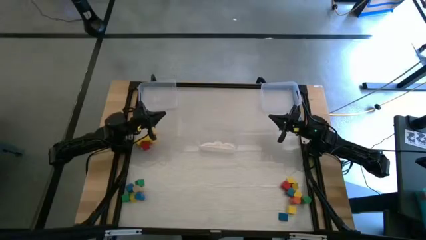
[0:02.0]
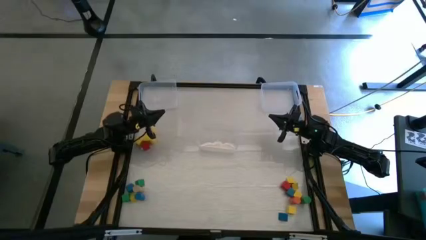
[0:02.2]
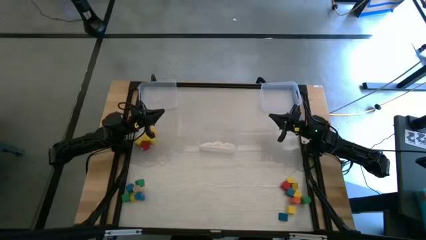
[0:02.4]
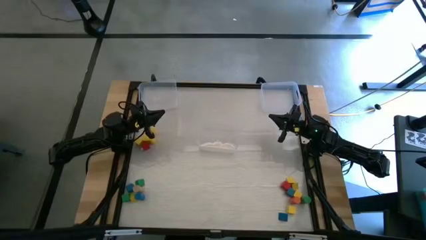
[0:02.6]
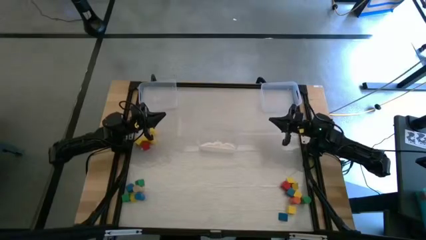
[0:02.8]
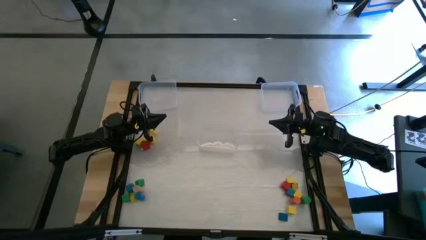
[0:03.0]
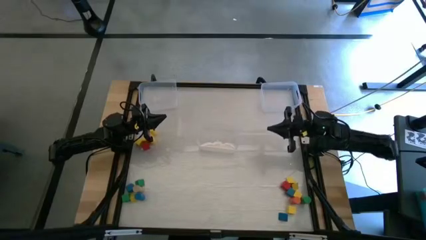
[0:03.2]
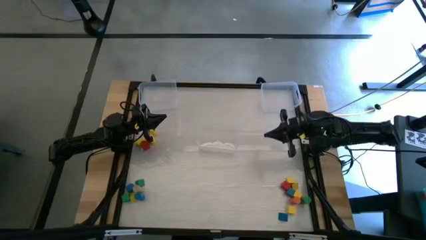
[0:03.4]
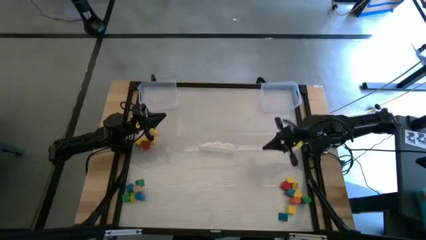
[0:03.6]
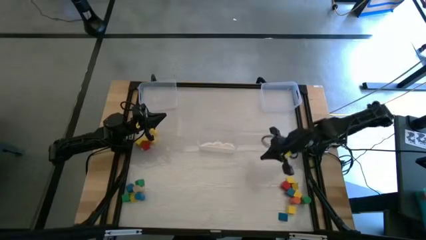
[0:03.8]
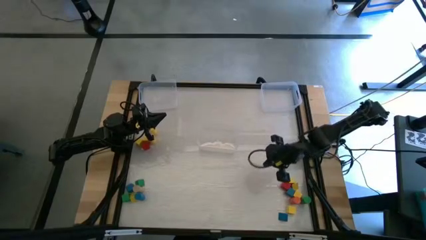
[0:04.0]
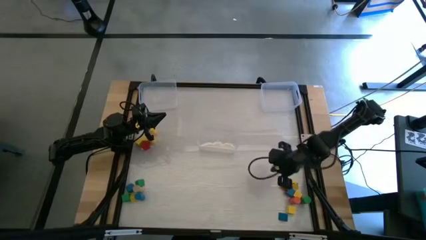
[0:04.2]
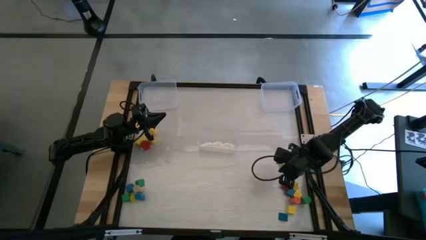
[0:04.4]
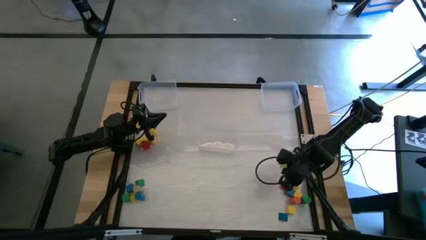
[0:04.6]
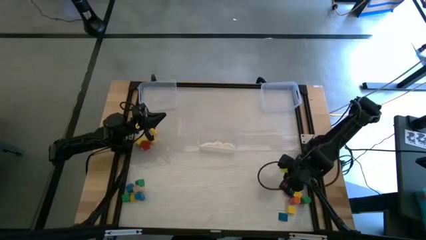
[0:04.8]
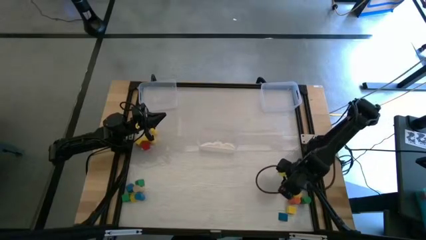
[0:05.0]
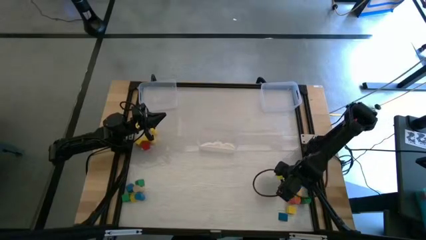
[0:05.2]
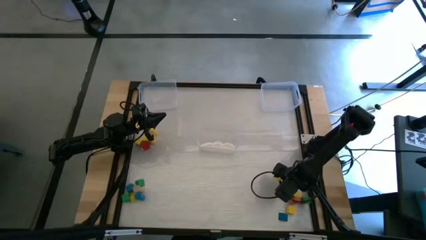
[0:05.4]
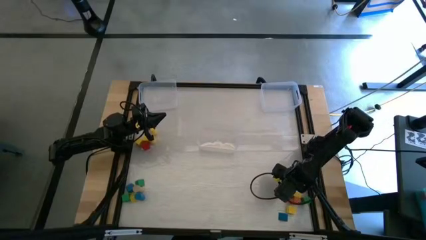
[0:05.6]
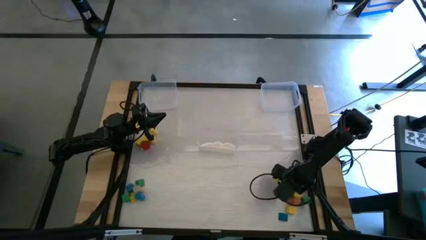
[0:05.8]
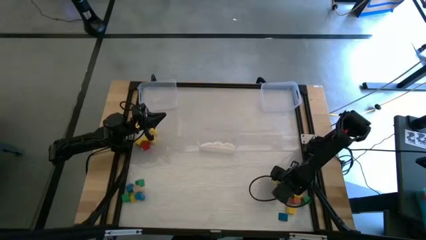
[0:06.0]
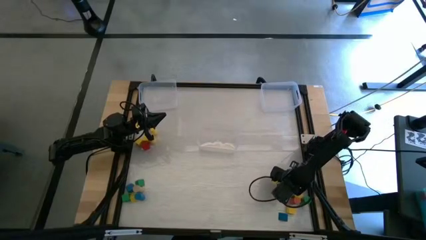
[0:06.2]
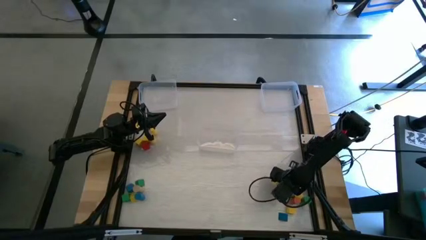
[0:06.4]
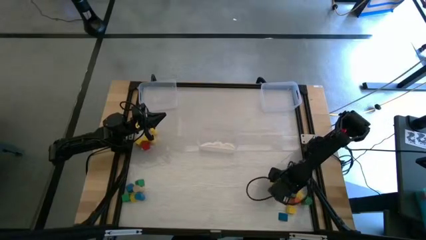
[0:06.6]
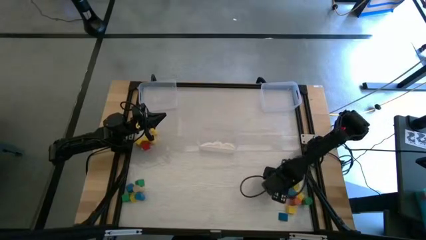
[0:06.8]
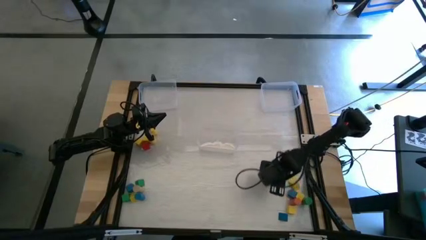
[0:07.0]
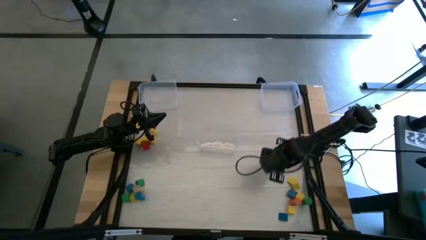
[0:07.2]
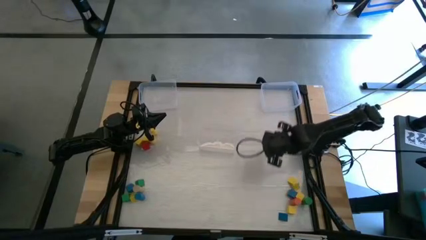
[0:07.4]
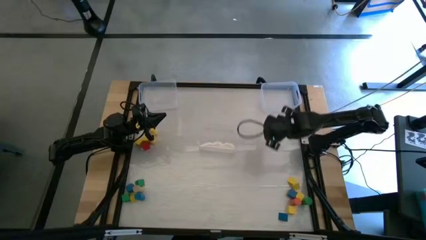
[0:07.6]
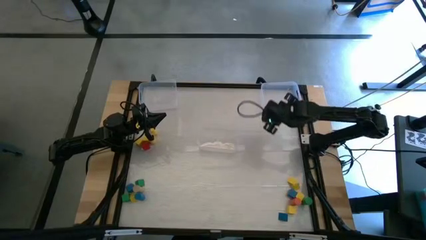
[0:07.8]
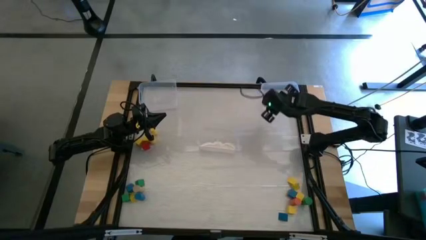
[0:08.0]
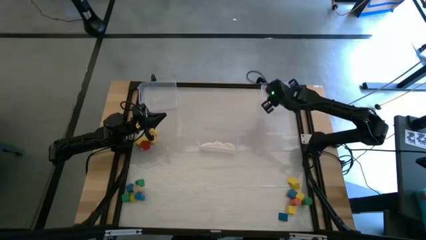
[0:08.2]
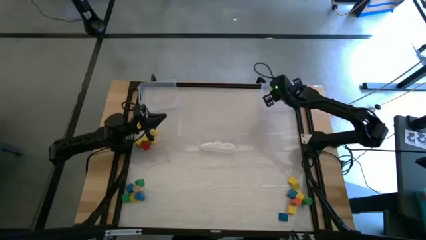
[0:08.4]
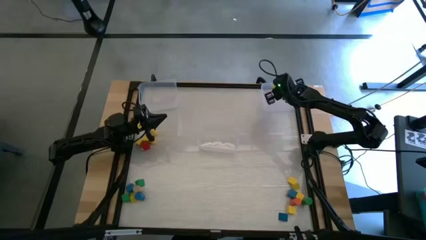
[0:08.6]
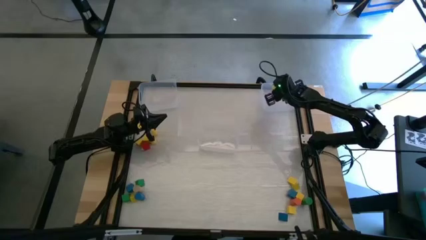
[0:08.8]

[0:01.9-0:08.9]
Task: Sort blocks by size
Put the red square block into the bottom transparent bin

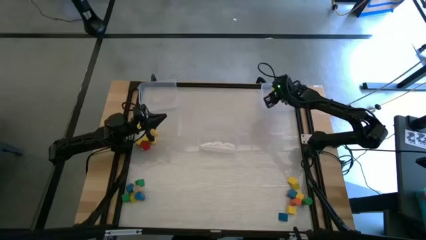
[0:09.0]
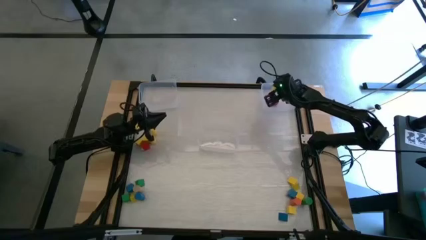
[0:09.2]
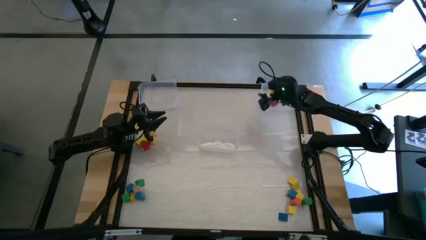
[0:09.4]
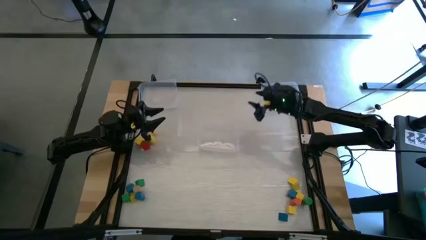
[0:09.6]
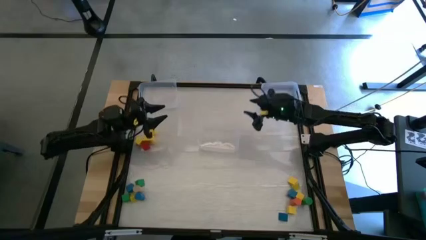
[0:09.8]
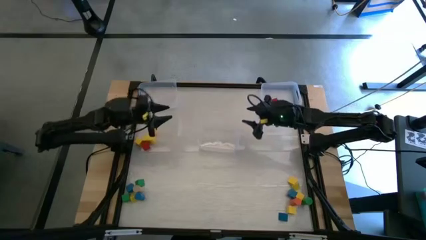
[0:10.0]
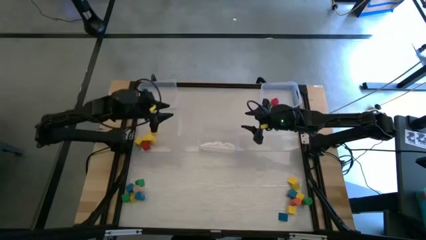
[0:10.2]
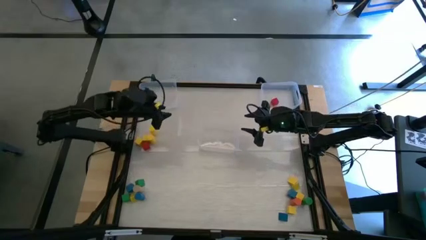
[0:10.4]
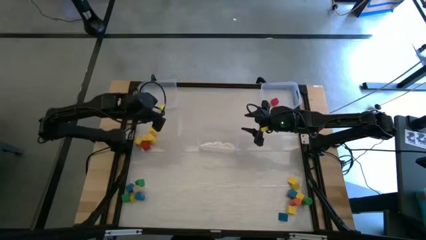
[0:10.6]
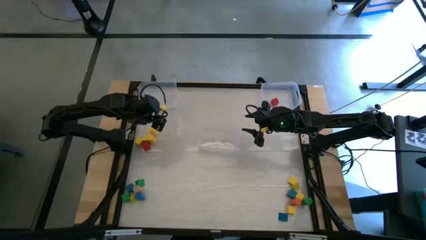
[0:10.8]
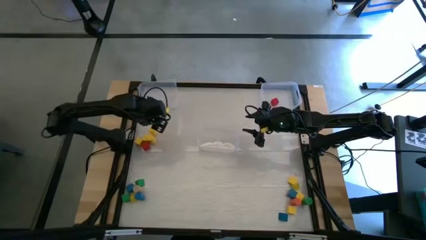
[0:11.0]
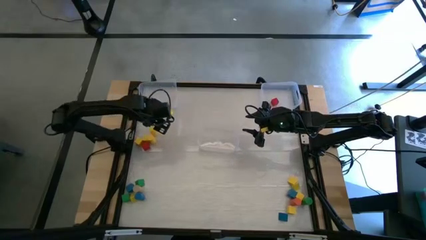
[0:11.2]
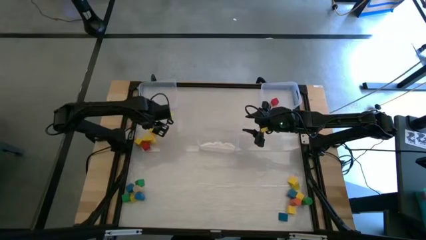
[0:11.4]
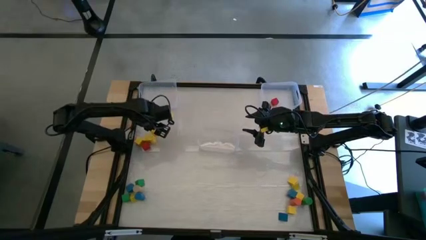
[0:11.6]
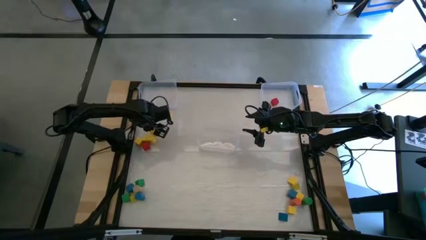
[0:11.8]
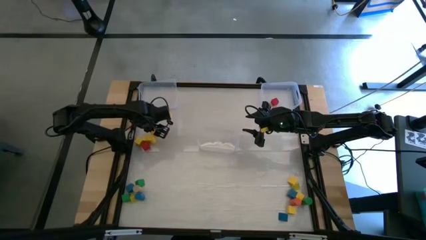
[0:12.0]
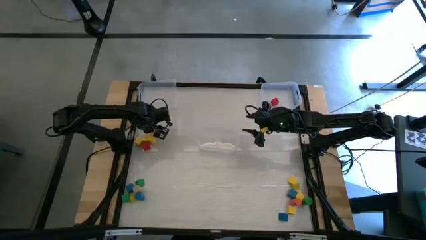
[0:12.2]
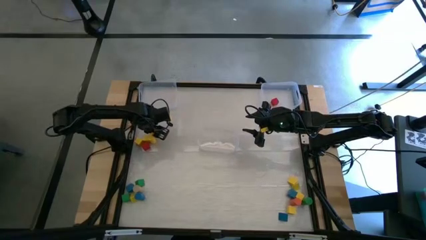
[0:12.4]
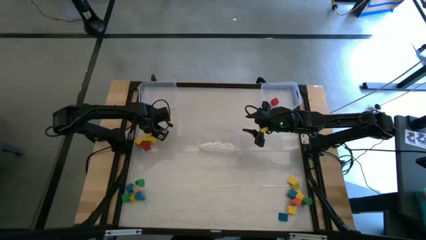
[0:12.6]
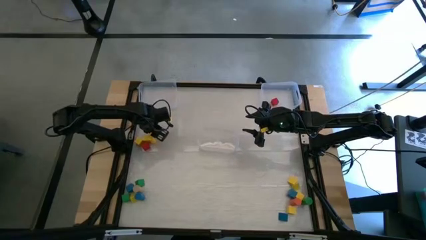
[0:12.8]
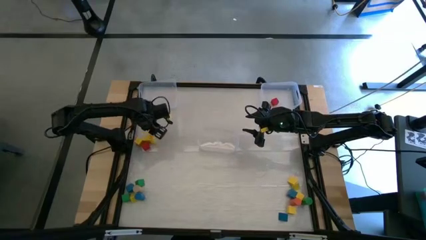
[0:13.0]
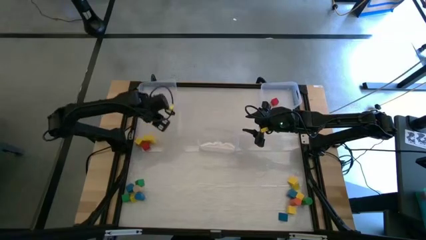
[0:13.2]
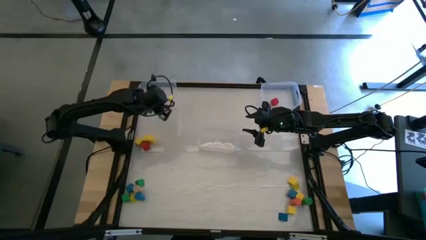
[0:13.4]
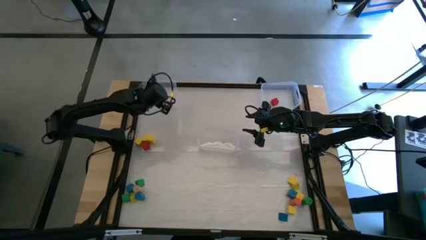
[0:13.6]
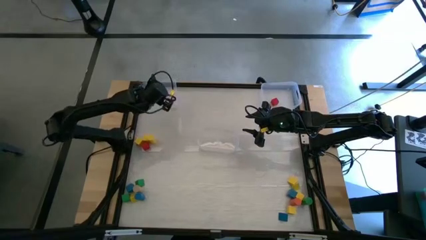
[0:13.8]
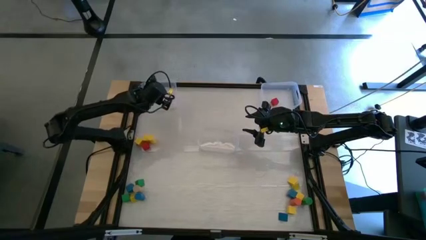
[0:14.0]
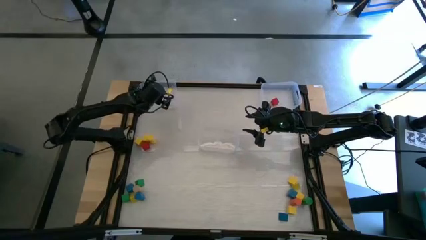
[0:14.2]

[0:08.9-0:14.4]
Put the yellow cylindrical block into the top left transparent bin

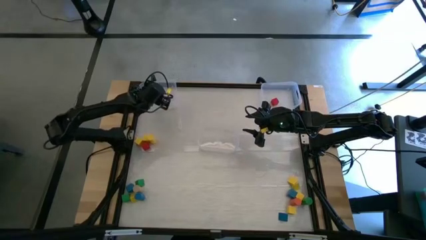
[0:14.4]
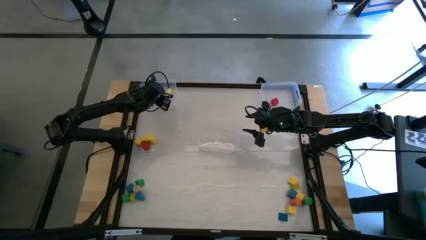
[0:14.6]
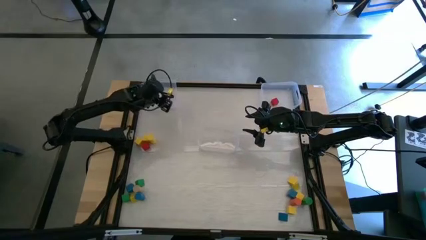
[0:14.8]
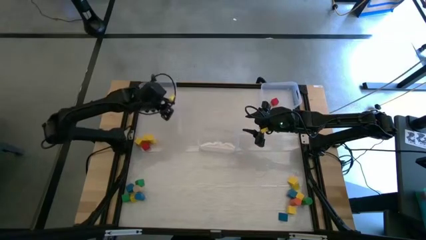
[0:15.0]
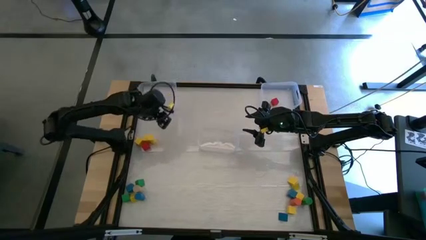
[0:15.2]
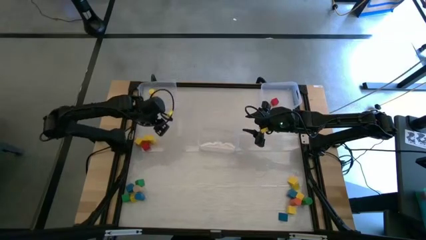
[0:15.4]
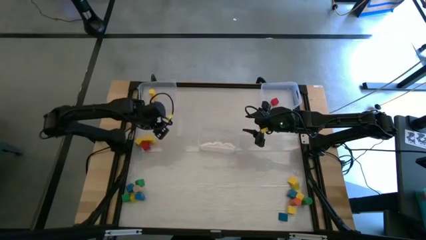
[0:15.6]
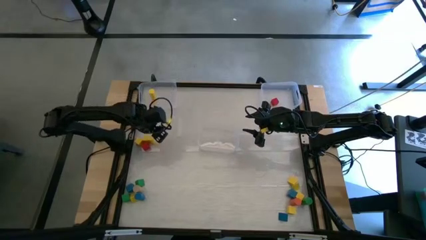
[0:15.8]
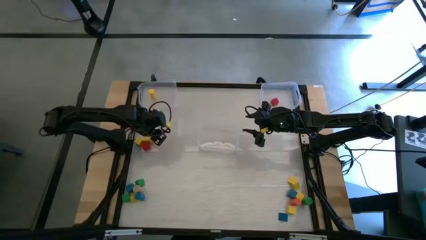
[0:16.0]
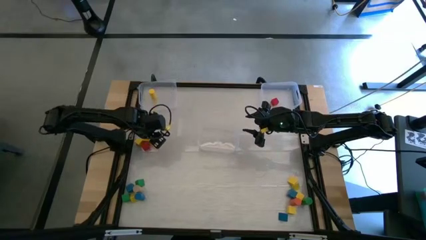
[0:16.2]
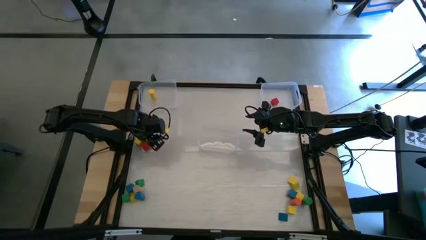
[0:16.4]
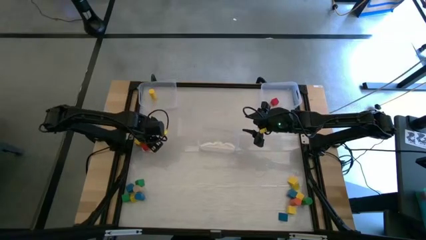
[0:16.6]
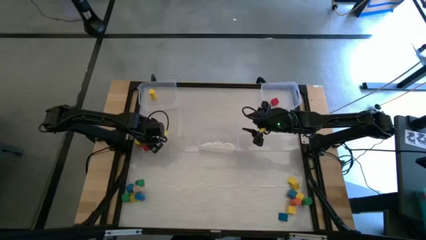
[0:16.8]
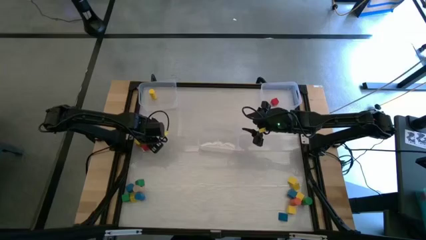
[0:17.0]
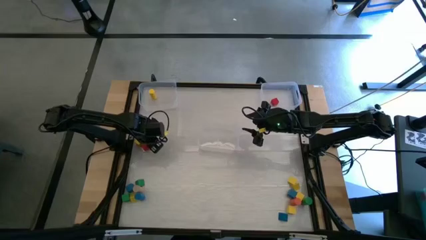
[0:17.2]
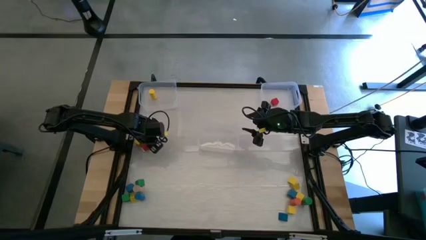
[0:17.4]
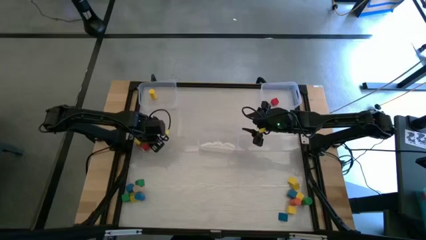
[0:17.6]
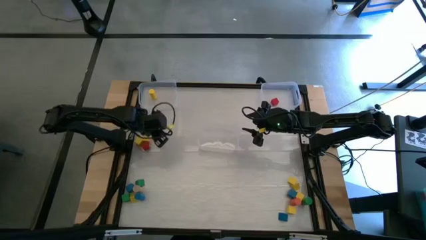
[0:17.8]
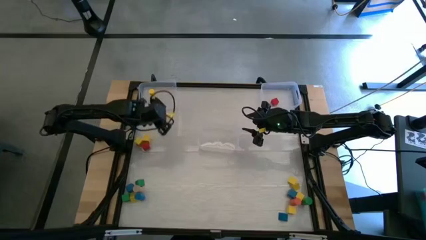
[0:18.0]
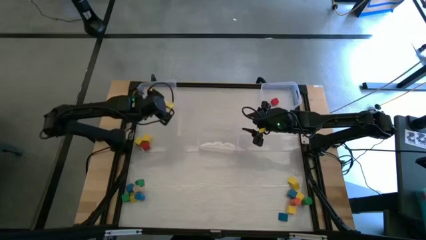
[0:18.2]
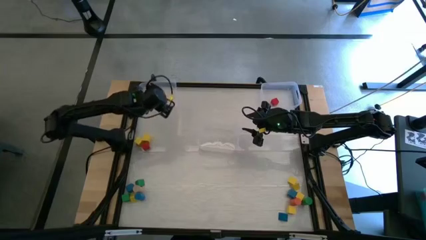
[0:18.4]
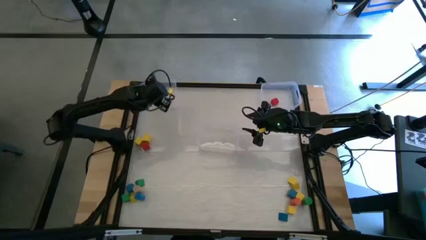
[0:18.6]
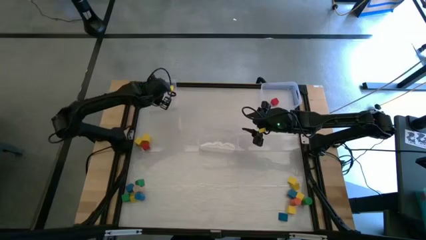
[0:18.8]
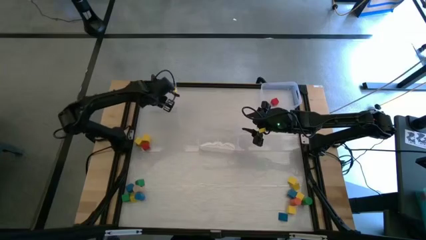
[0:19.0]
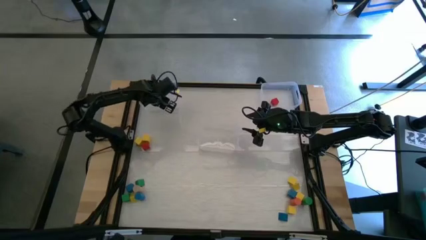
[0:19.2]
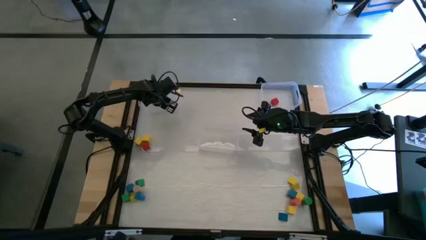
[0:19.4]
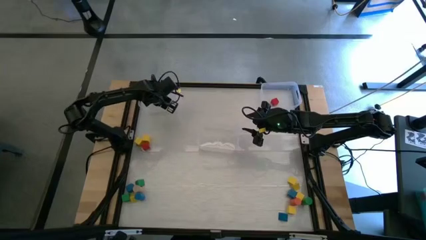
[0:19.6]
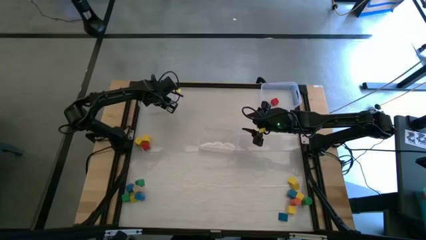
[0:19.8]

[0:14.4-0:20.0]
Put the yellow cylindrical block into the top left transparent bin
